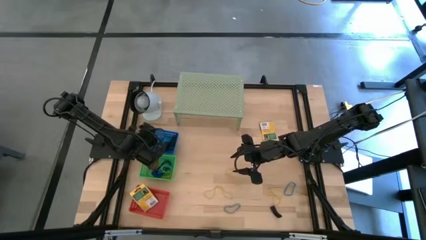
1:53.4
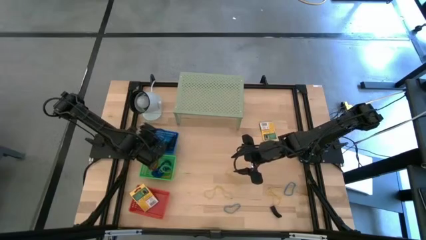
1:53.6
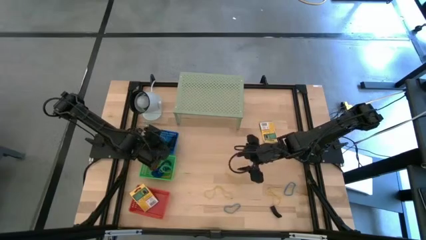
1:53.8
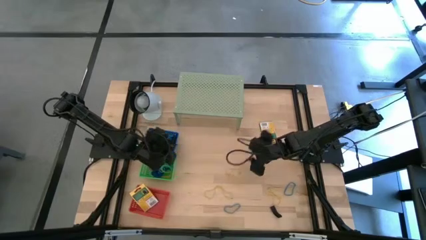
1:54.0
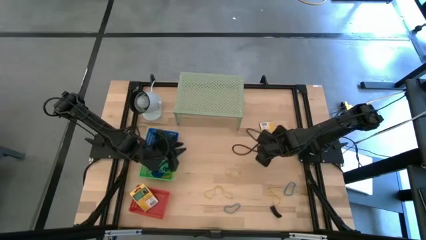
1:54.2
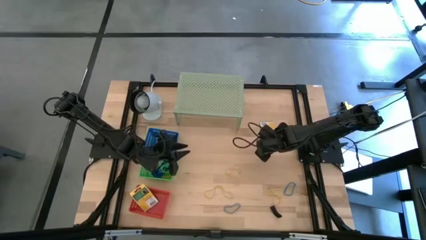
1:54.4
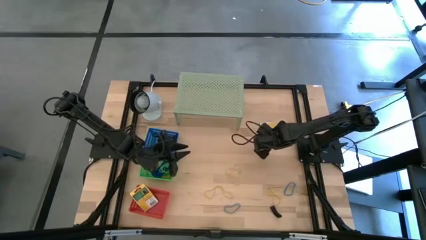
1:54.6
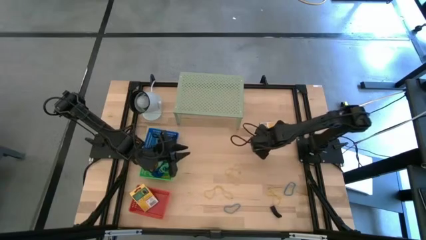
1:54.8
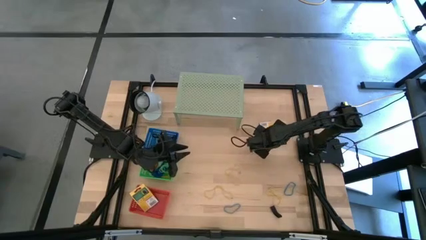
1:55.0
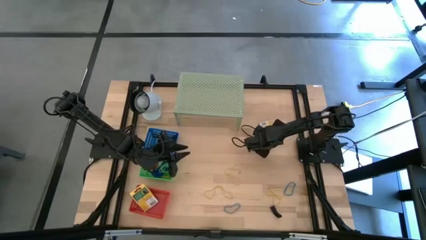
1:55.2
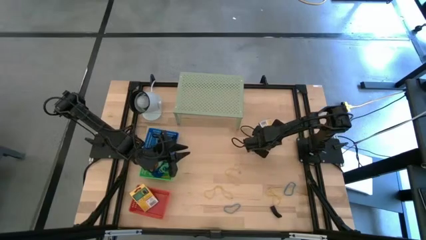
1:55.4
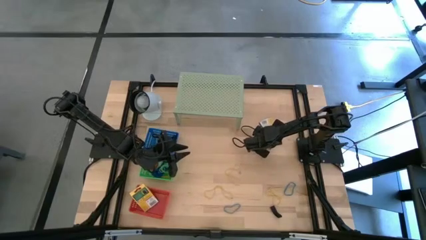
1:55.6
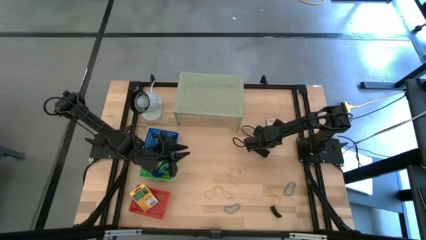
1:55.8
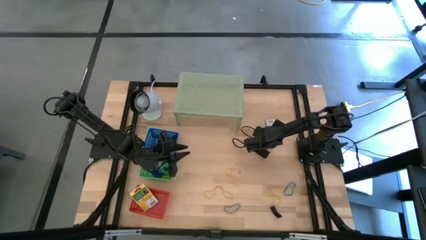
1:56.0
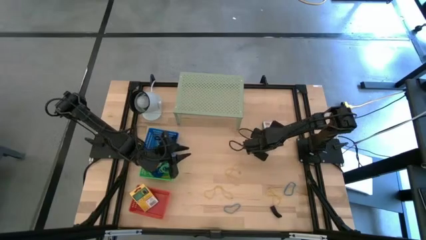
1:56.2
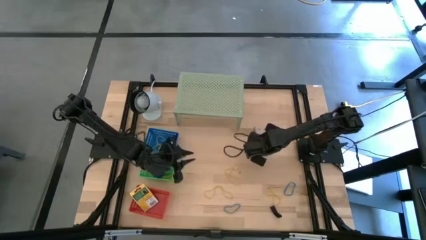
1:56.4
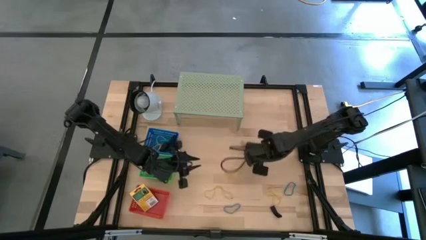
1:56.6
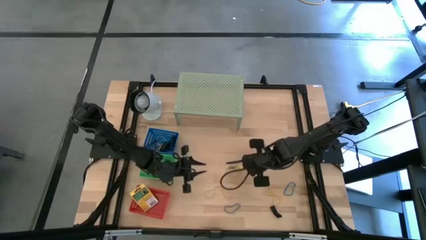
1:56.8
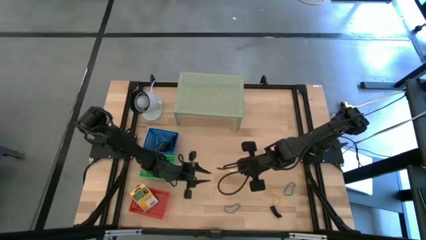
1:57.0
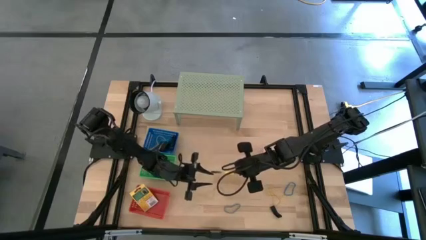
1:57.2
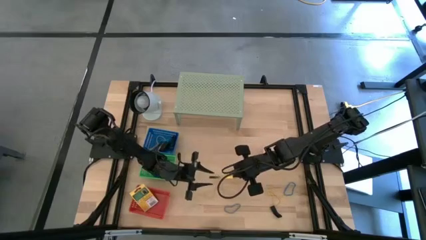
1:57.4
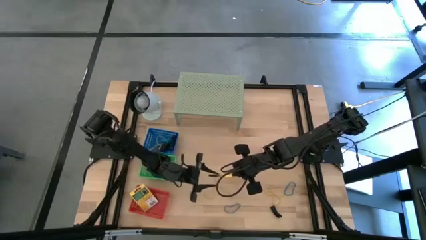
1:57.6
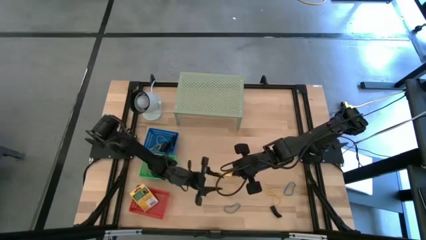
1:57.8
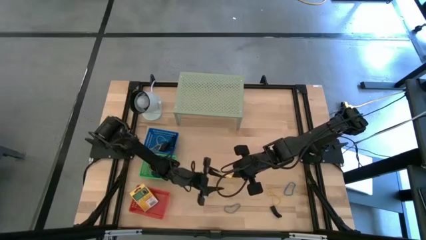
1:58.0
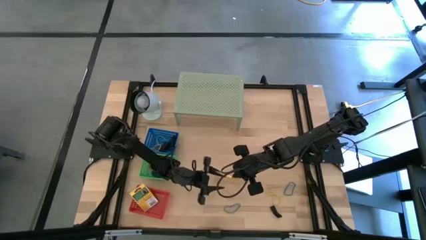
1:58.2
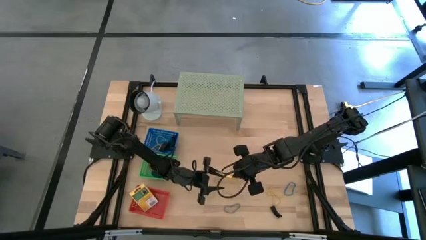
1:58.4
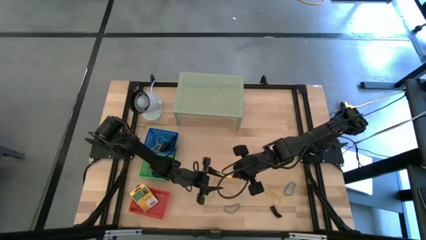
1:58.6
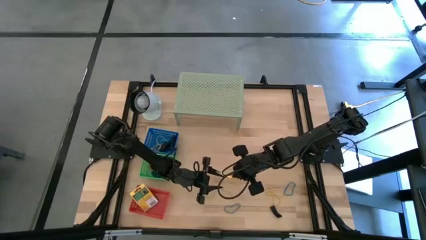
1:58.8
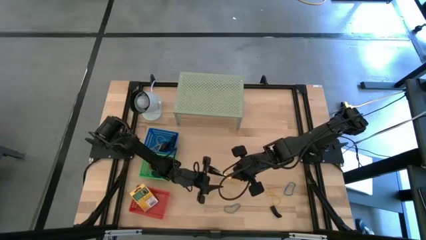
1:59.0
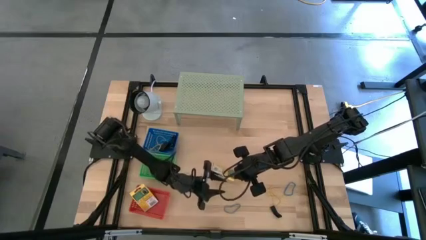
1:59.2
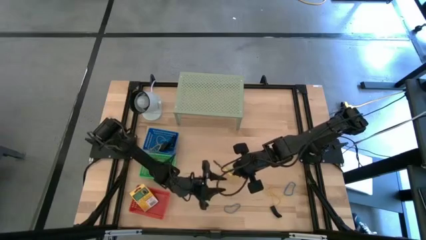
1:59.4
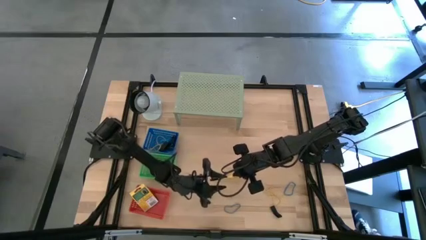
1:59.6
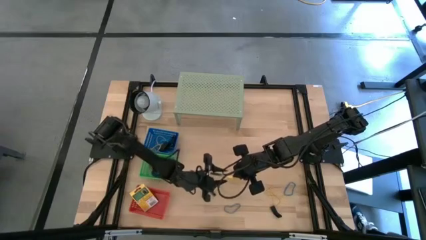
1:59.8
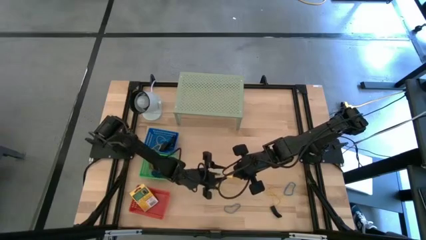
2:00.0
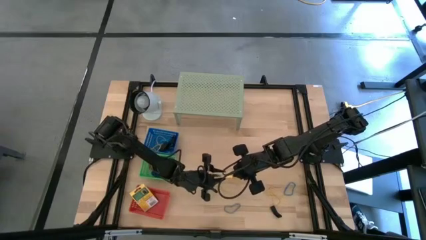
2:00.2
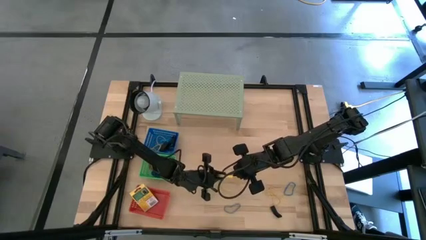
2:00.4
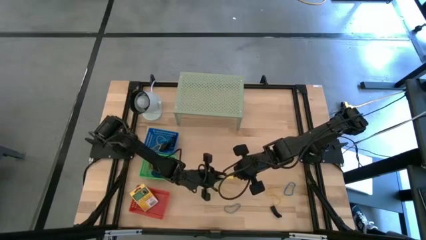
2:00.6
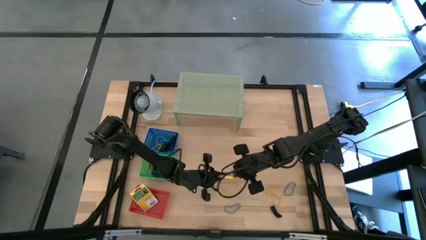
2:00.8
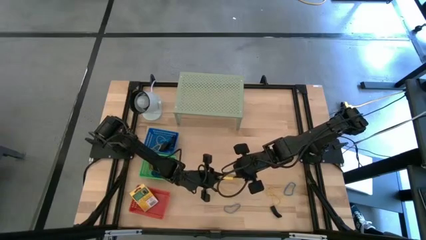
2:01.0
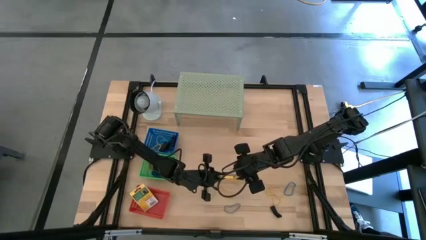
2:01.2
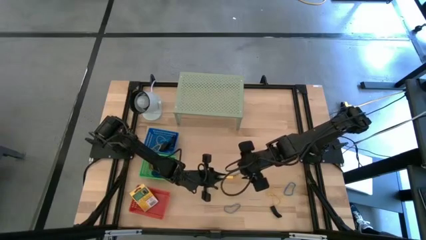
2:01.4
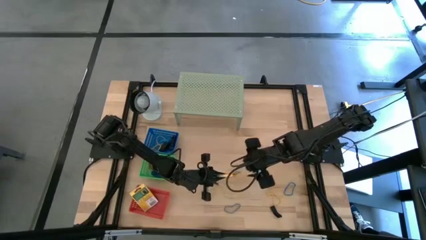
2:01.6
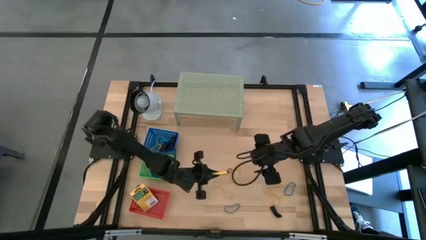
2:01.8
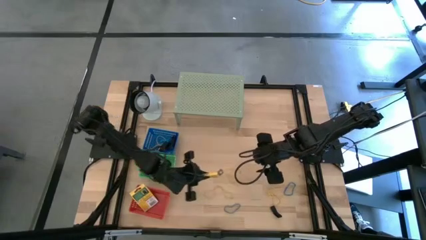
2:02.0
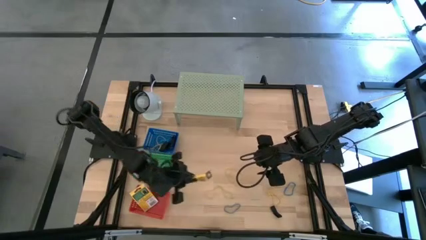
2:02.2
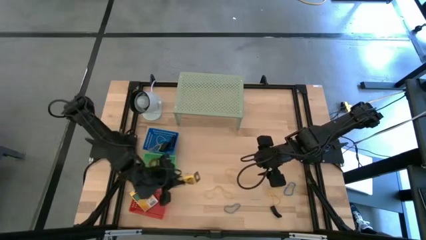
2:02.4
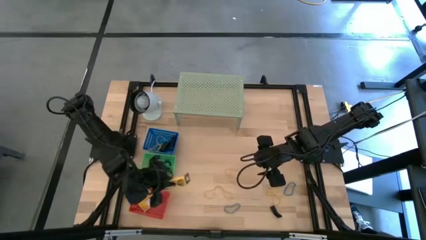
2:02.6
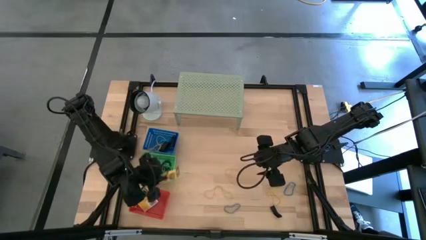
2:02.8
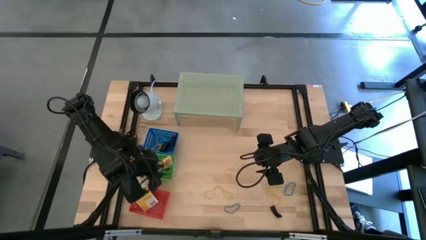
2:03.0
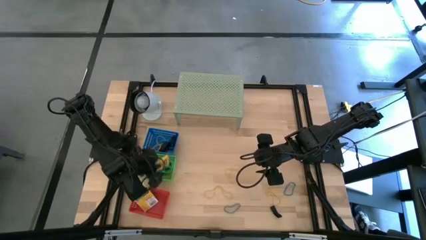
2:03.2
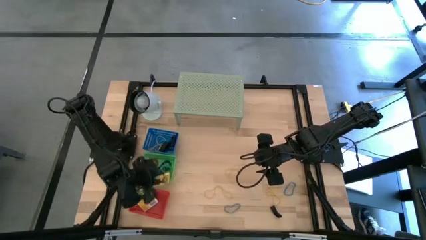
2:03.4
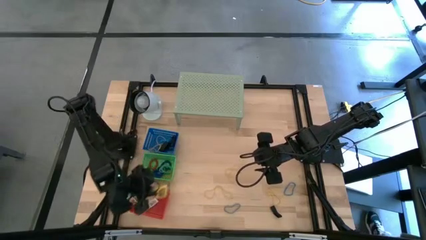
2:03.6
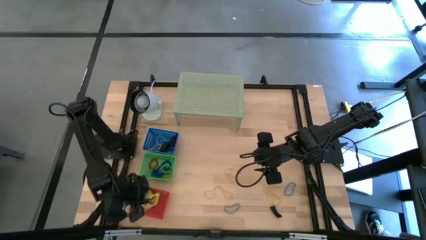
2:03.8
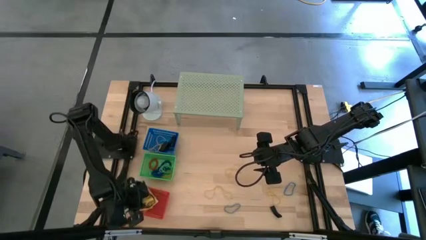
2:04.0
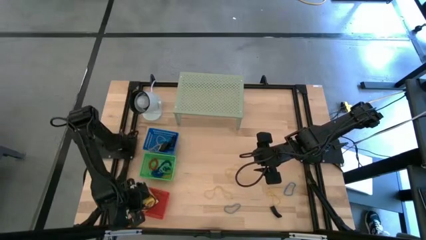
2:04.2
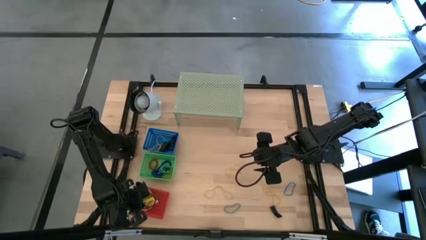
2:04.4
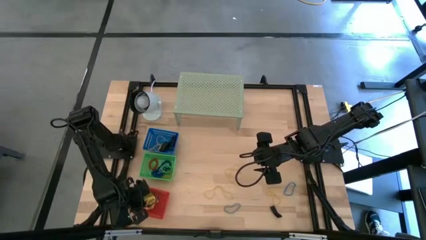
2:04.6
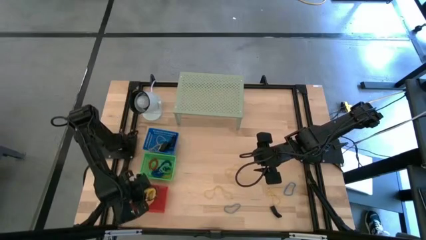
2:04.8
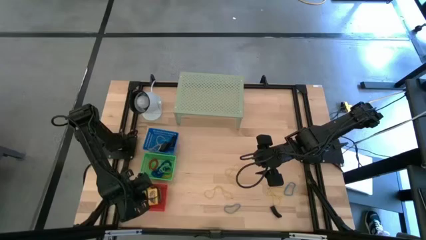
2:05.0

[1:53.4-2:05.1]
Task: Pick & Place Office Desk Supplies
Put the yellow crayon box into the red bin

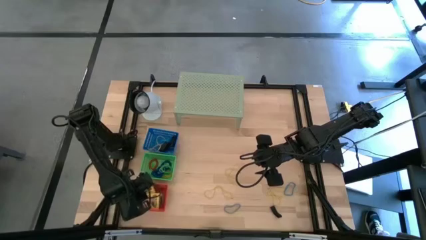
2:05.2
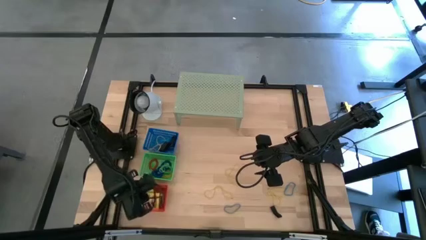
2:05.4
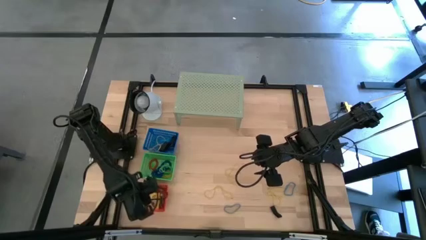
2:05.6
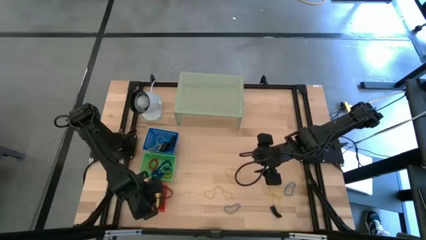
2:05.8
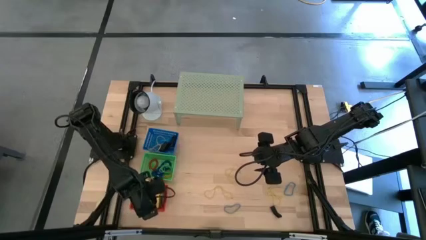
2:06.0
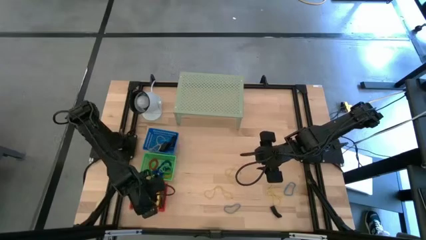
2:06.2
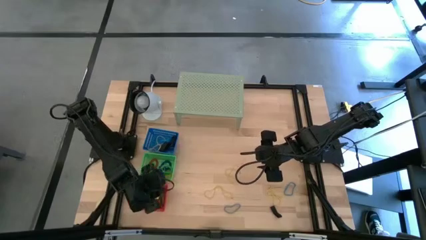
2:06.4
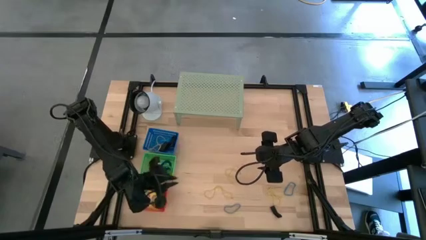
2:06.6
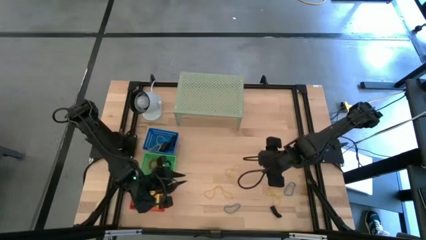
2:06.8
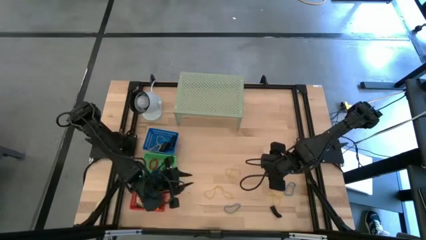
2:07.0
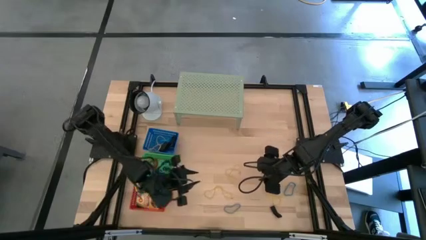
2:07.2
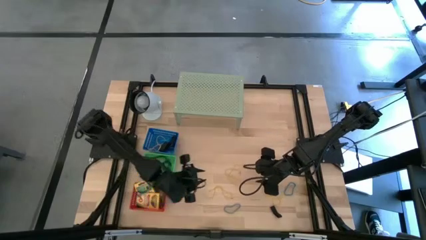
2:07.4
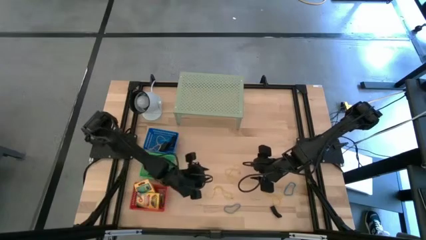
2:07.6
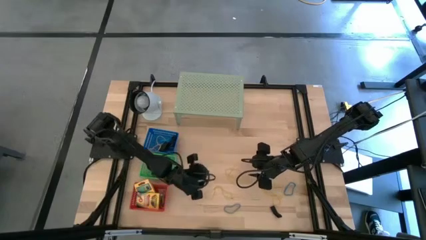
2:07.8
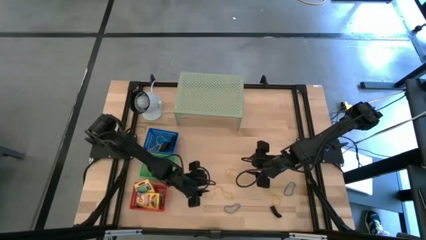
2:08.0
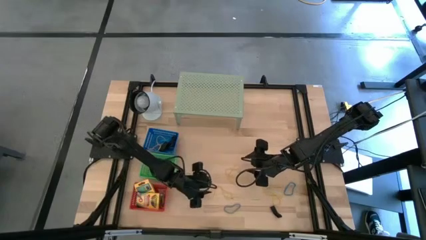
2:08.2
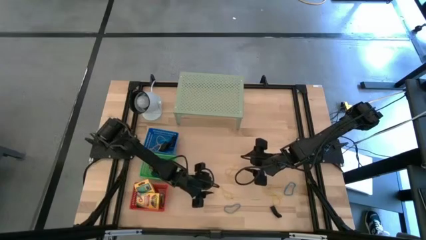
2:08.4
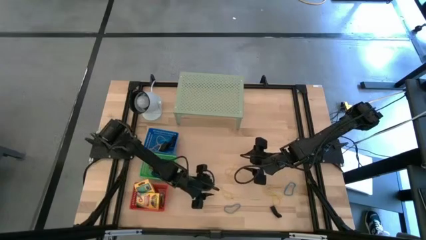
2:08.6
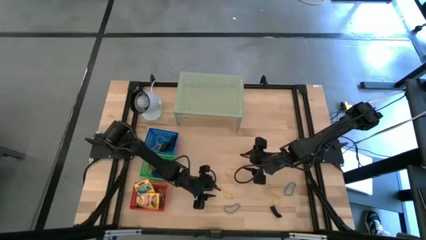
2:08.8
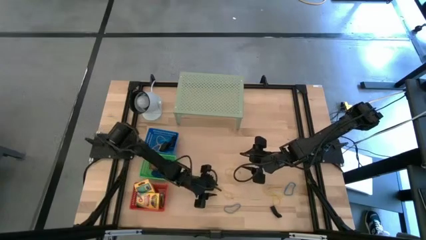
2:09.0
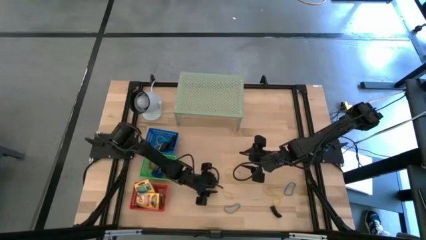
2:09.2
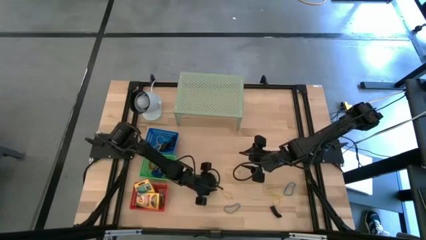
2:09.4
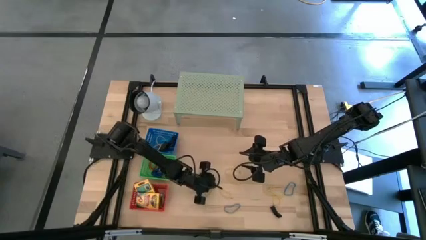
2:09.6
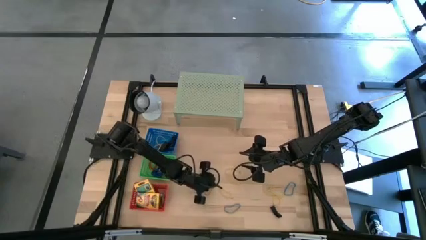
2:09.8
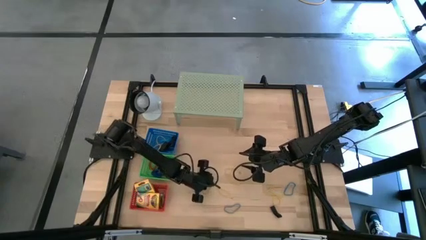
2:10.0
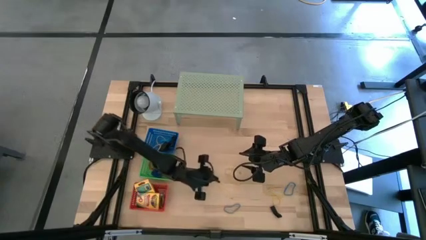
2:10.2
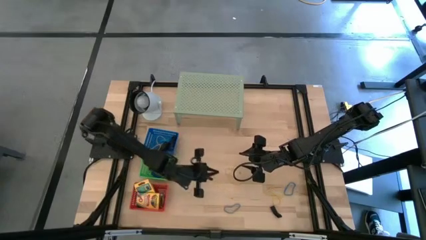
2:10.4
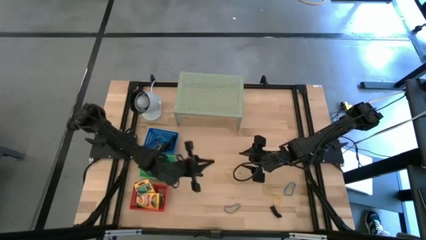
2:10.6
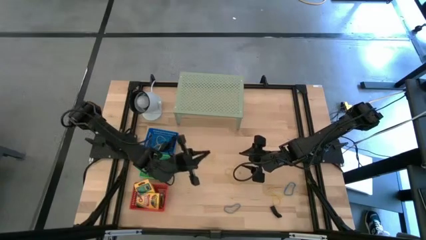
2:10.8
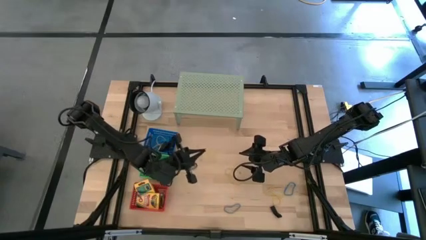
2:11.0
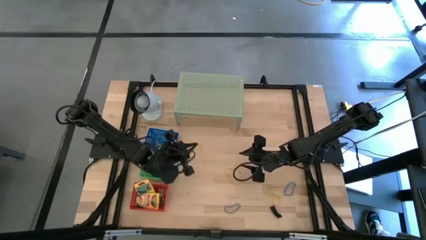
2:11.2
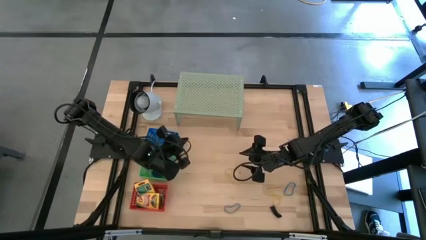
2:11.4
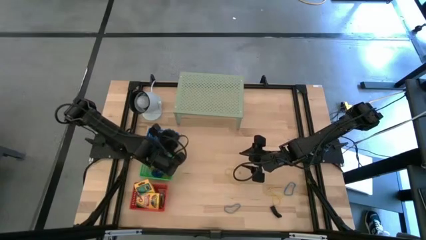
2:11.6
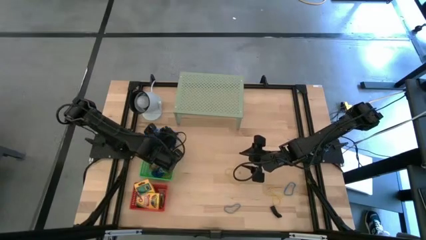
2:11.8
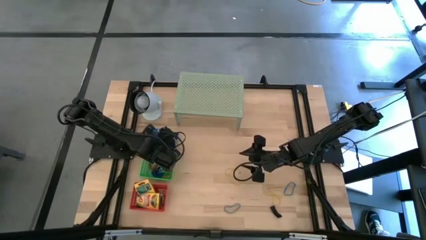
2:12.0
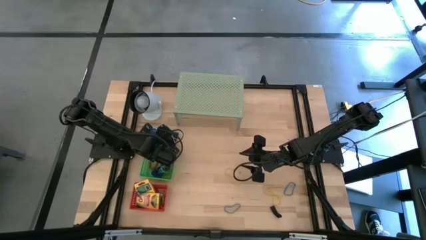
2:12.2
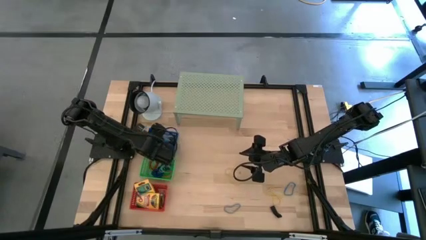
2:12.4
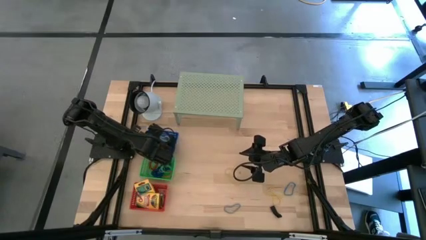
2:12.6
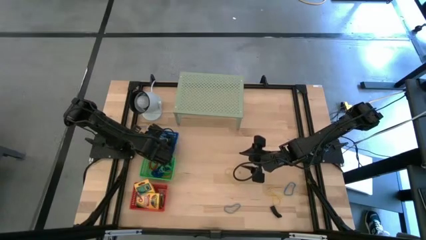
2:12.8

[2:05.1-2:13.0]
Put the yellow rubber band into the blue bin
